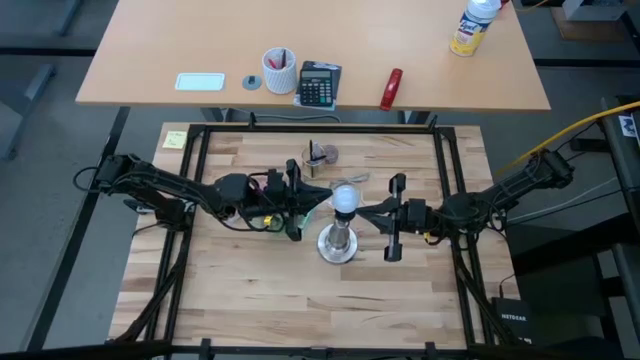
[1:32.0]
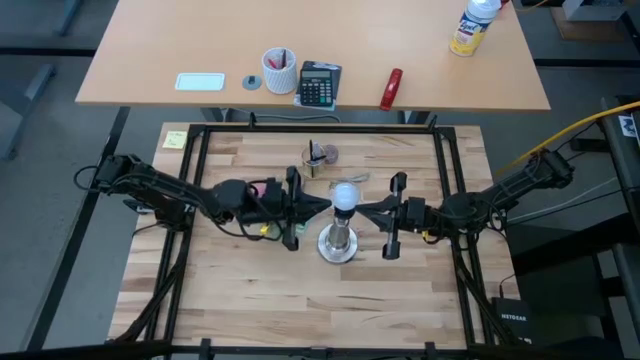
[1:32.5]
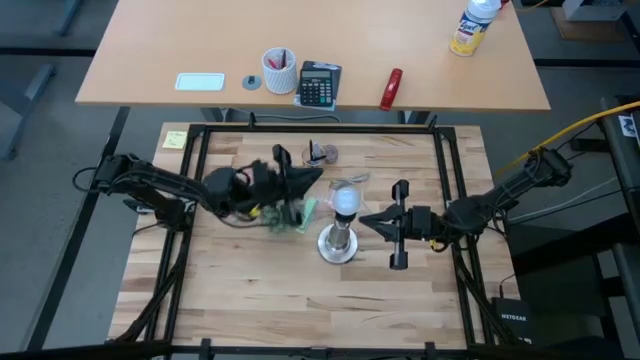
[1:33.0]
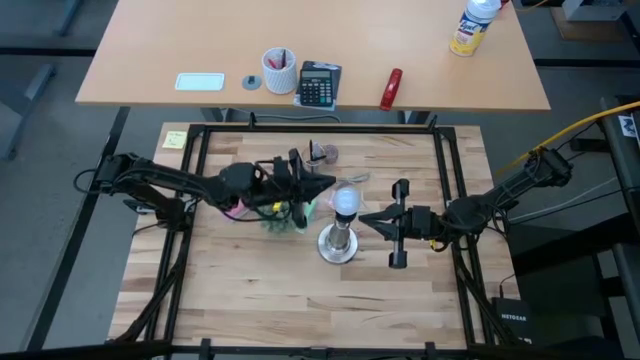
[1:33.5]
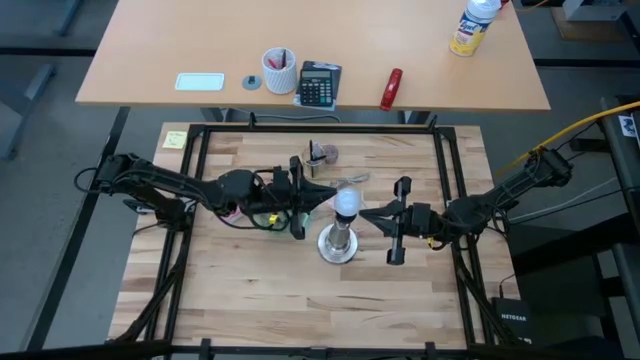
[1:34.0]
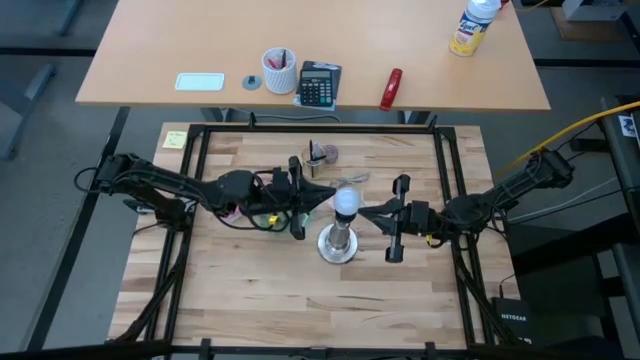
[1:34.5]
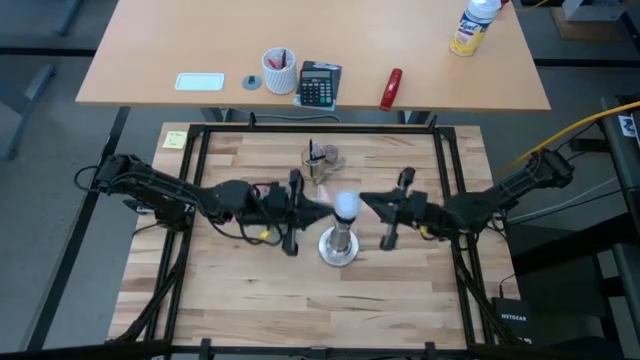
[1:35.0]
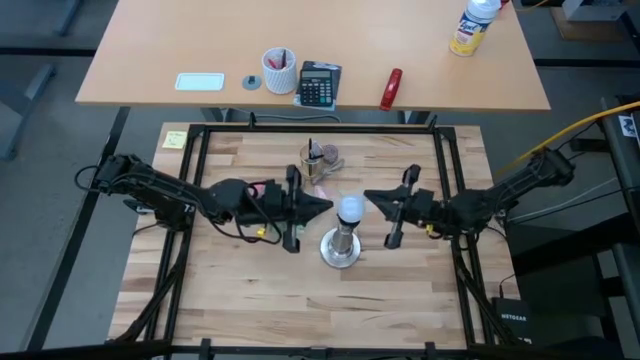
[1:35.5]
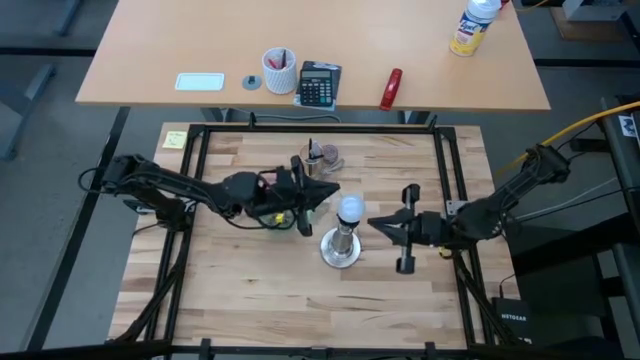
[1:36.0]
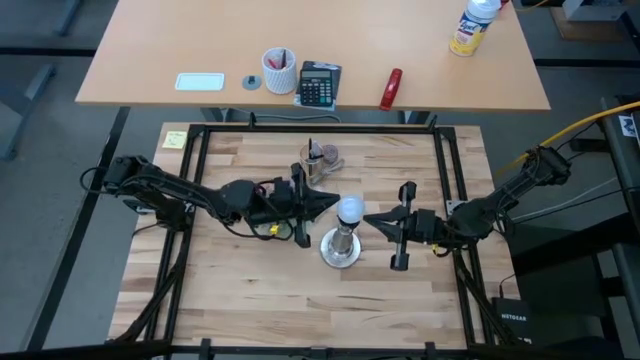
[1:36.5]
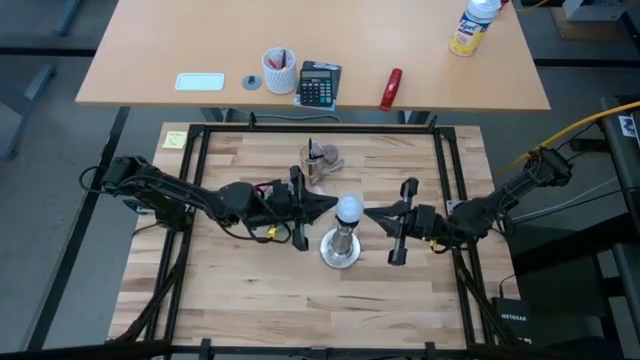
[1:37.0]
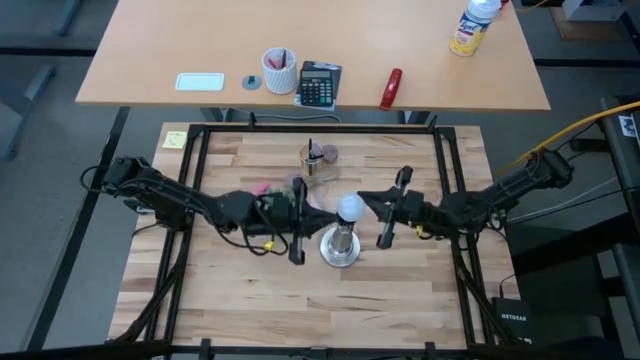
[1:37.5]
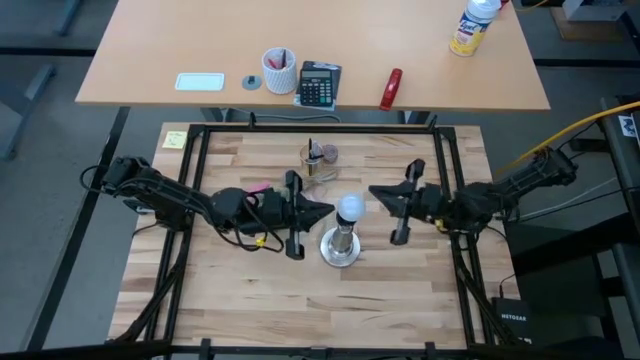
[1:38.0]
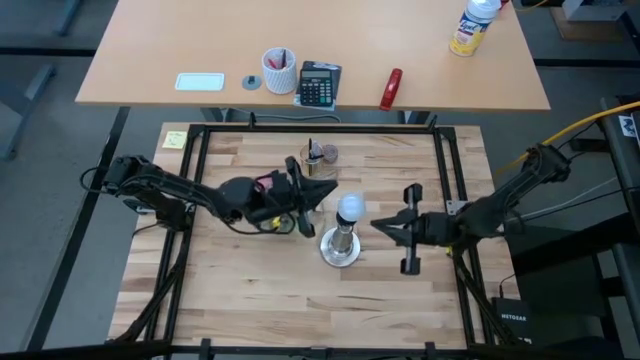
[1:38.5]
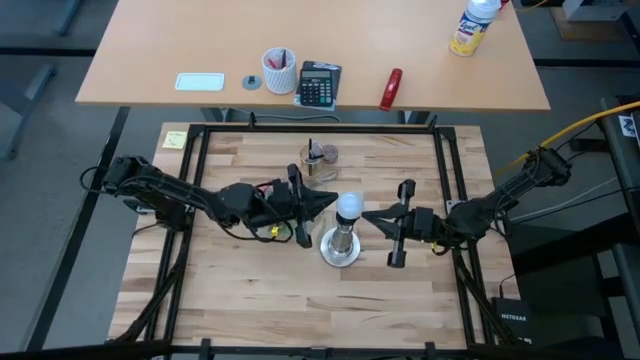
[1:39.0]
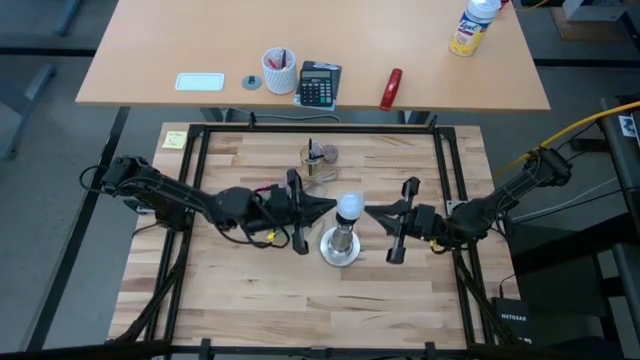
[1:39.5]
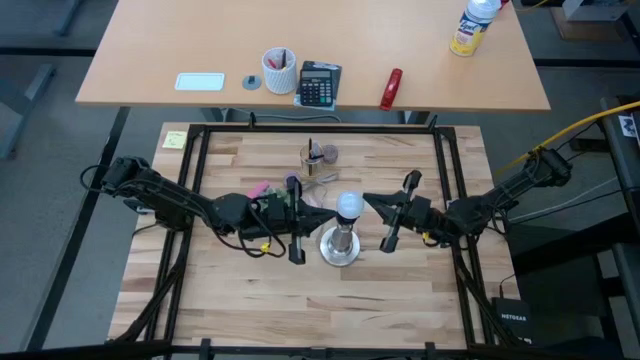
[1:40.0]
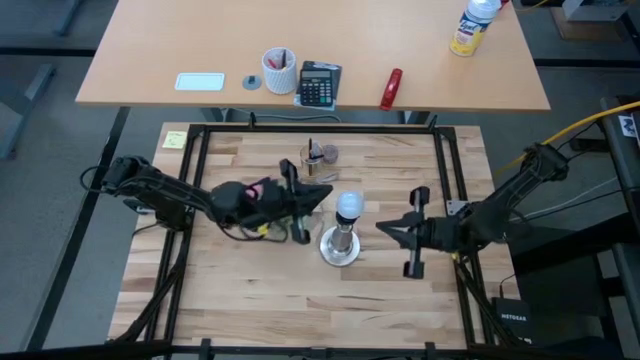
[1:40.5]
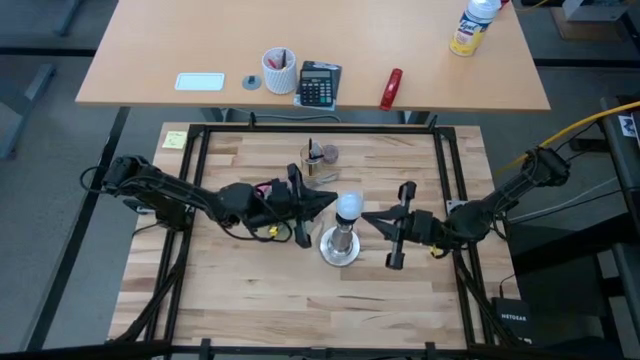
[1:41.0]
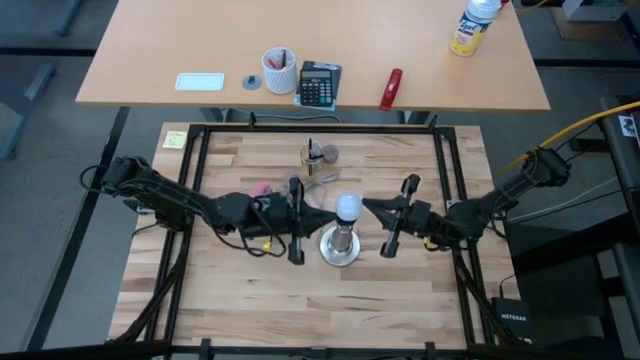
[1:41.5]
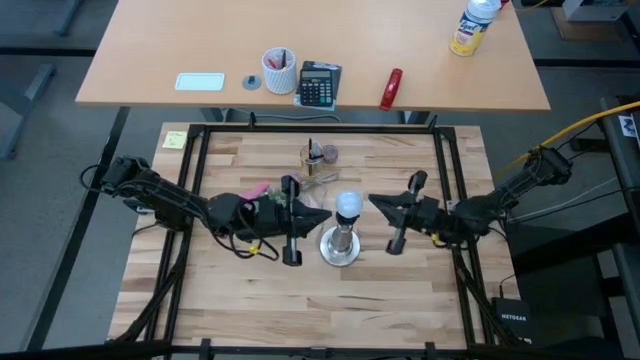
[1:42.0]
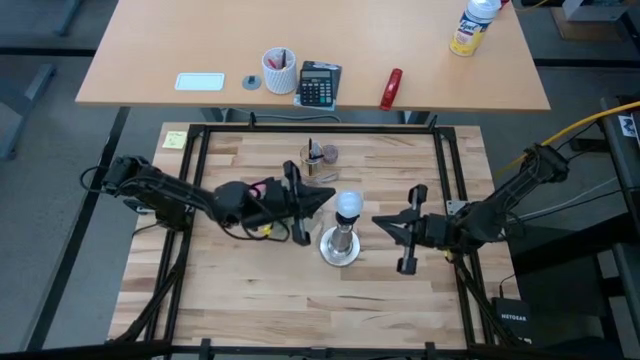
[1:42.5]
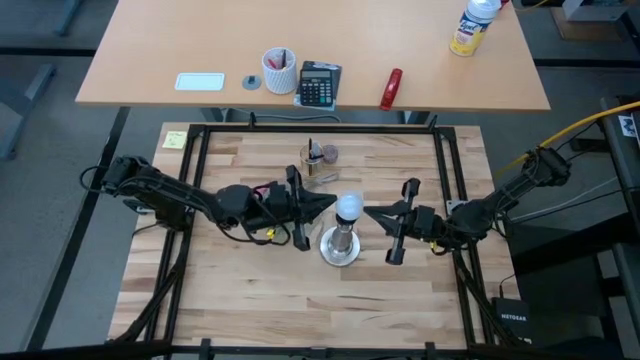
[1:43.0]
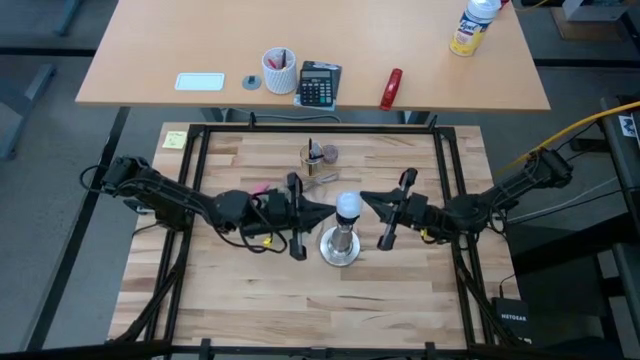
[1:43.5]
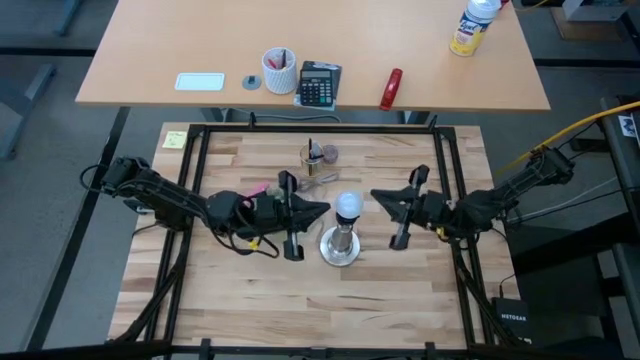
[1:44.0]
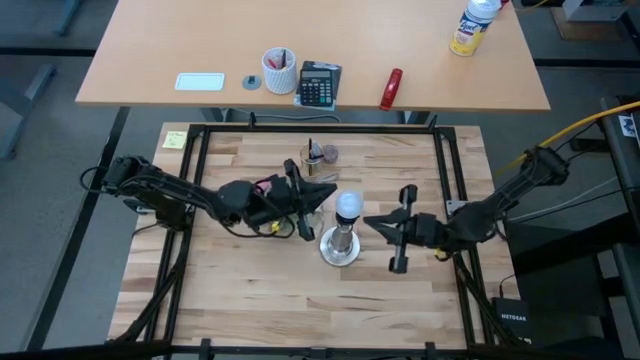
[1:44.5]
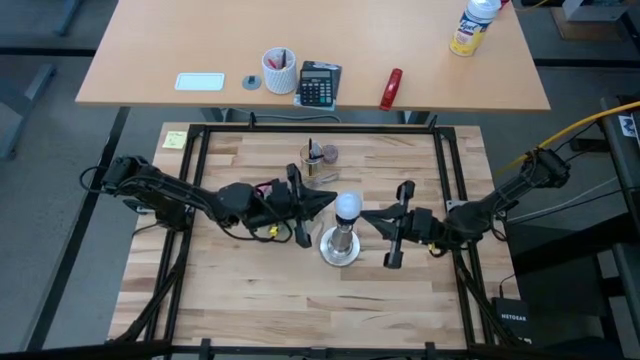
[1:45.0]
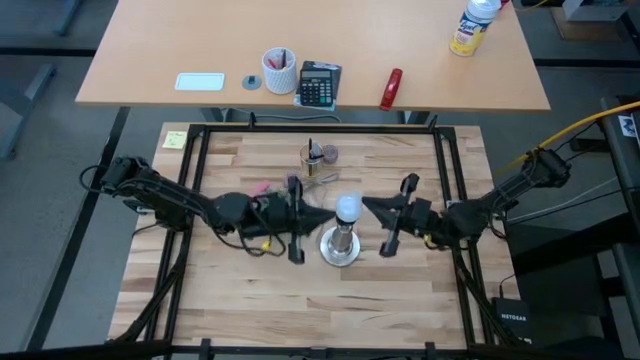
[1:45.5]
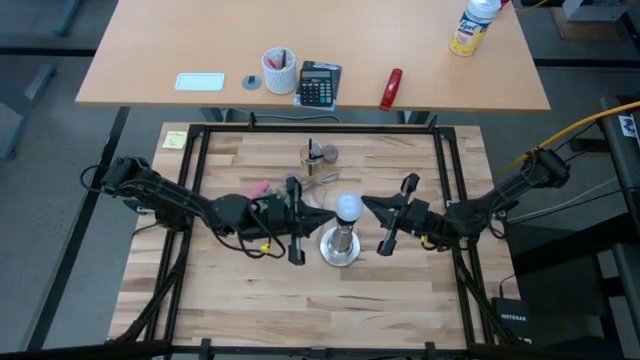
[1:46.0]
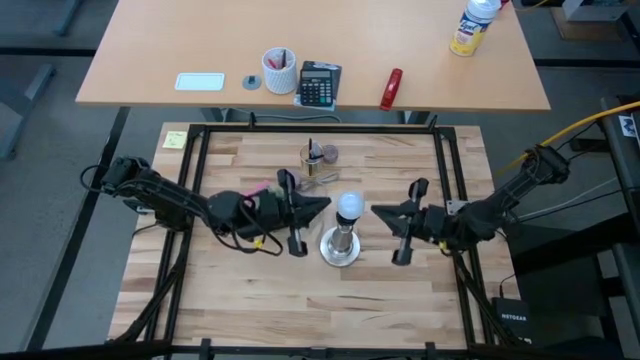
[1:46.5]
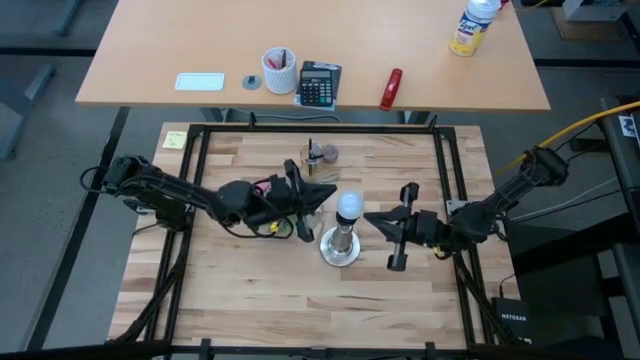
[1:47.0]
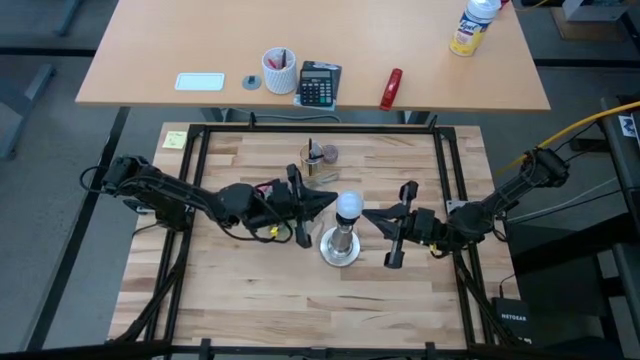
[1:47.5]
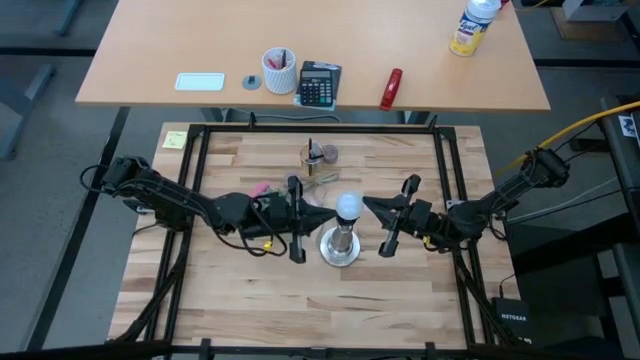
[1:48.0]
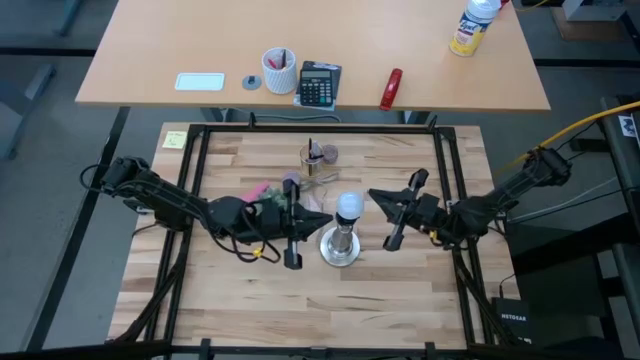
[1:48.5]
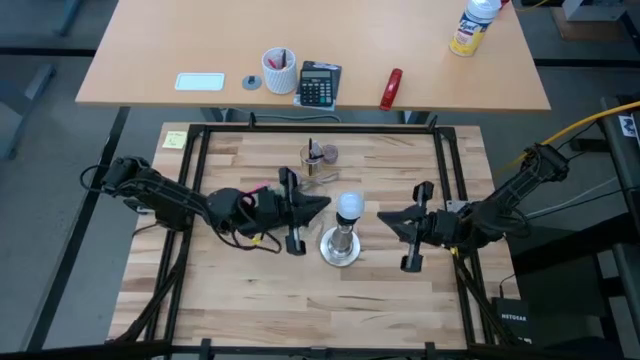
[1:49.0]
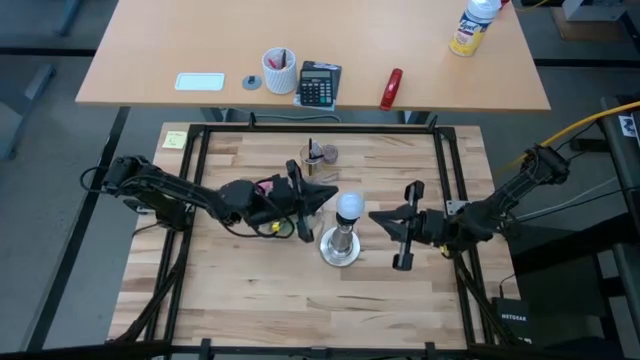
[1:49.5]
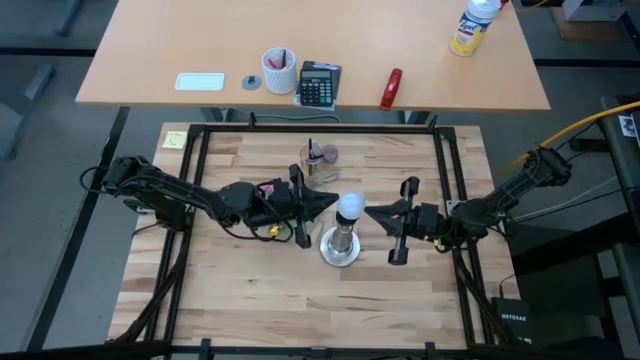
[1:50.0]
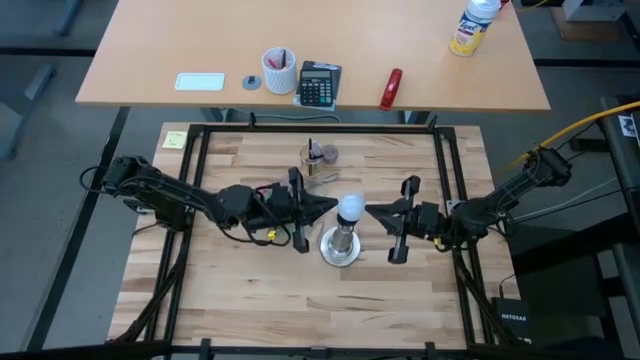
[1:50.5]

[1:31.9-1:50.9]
Task: Screw lightbulb
Remove the lightbulb from the lamp

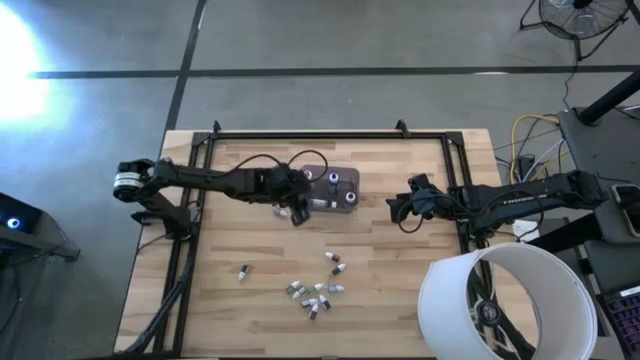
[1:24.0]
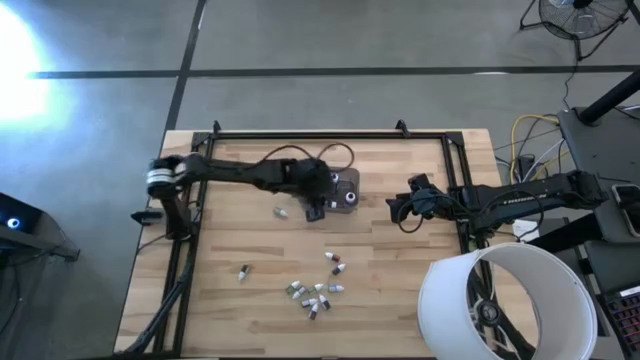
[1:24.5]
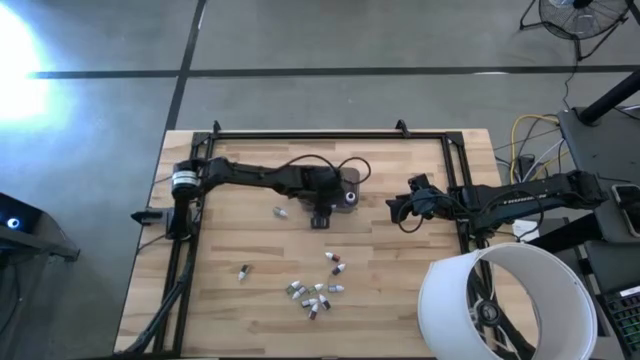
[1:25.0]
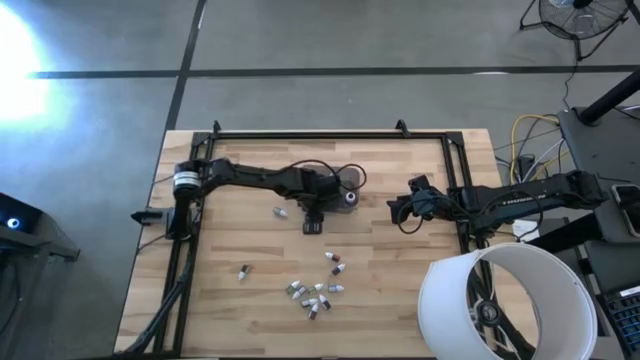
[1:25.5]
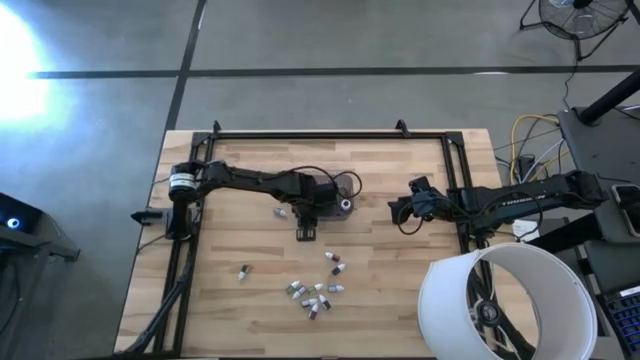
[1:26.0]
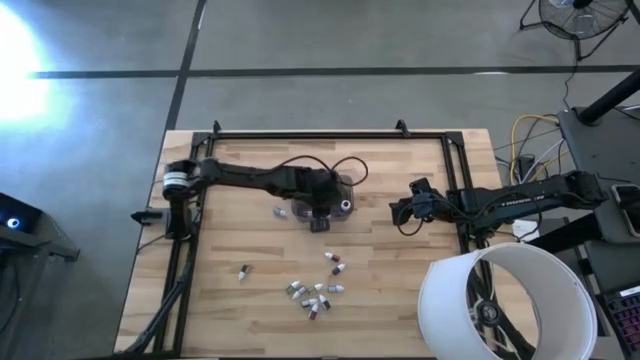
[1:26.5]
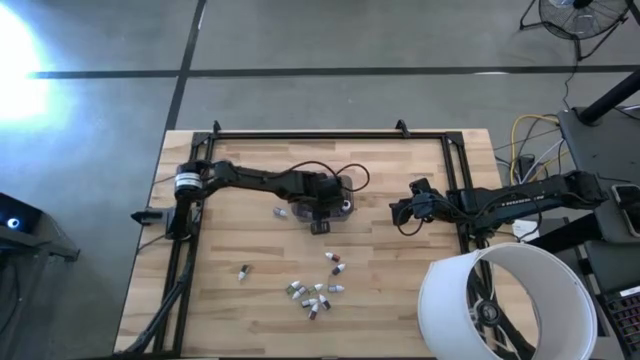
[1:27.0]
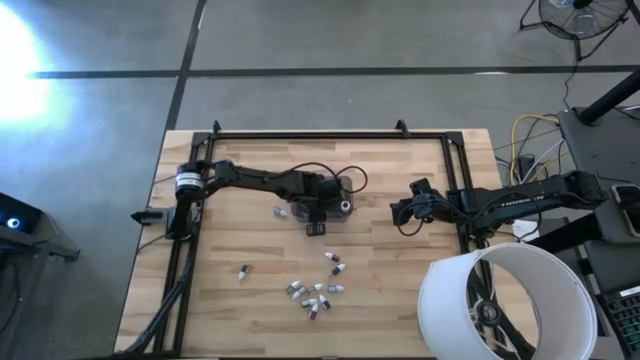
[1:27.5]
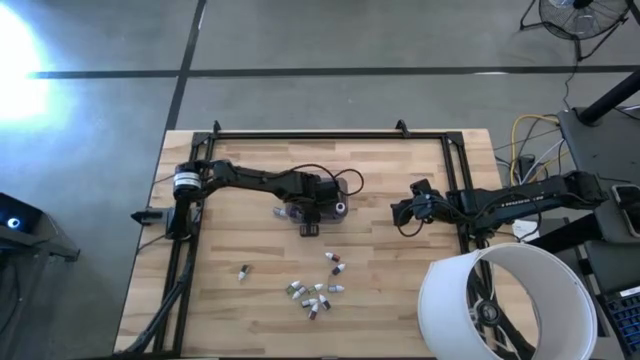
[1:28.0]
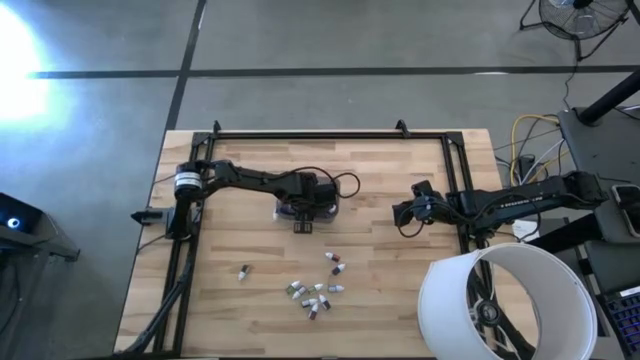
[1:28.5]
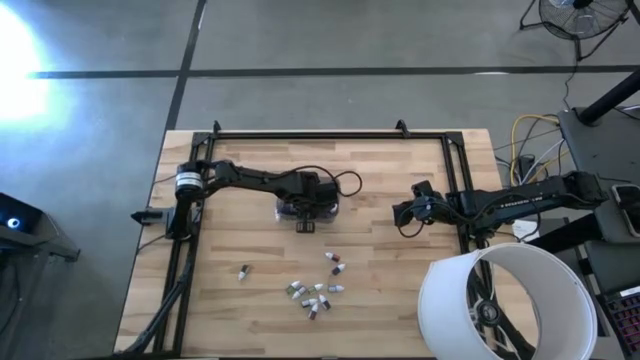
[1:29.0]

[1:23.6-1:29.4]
Task: Pick & Place food coloring
Put the large violet food coloring bottle into the black bin
